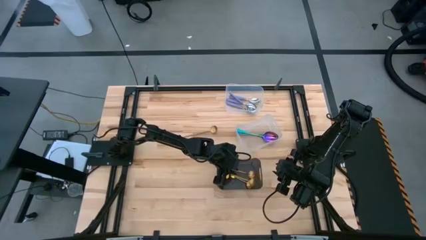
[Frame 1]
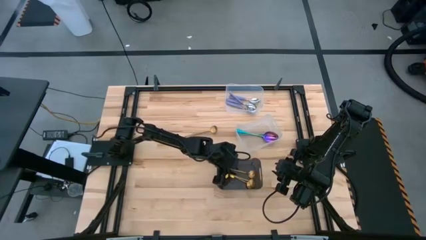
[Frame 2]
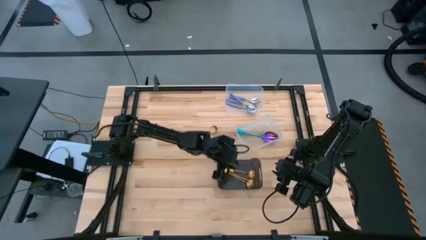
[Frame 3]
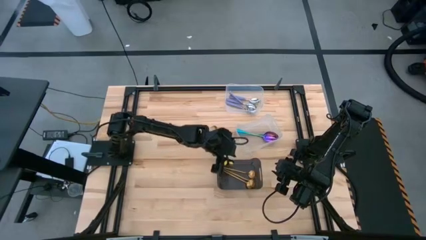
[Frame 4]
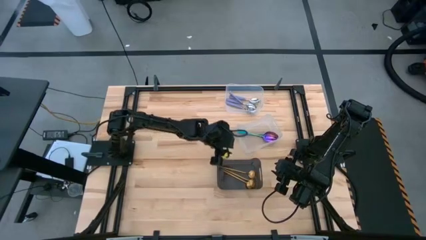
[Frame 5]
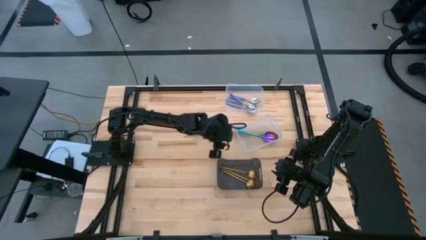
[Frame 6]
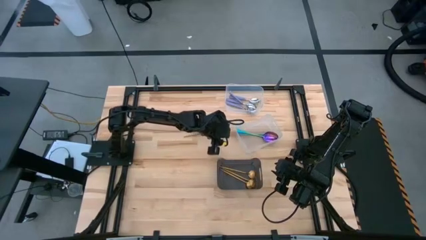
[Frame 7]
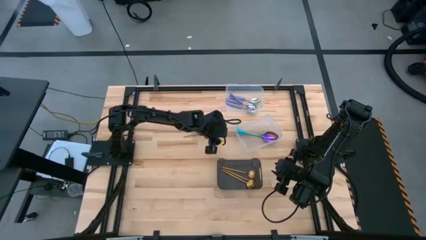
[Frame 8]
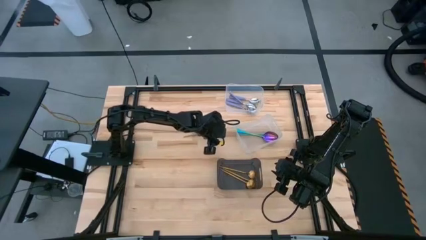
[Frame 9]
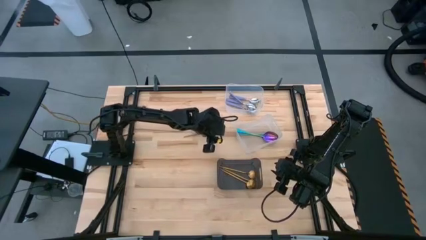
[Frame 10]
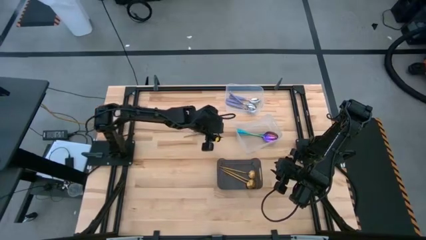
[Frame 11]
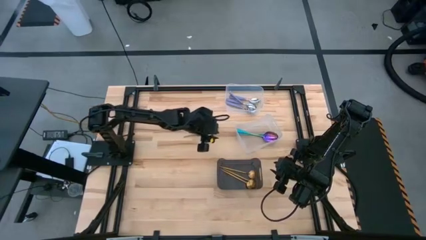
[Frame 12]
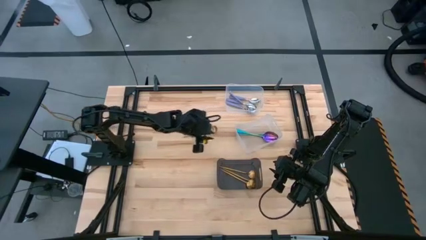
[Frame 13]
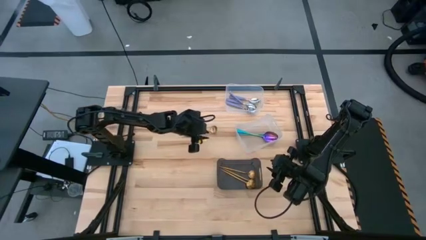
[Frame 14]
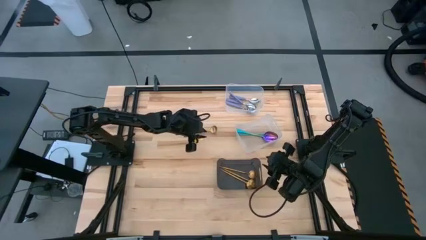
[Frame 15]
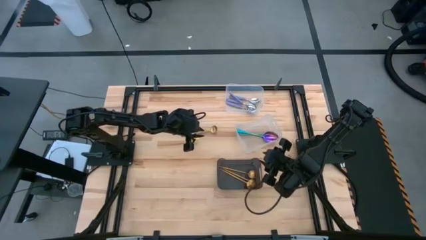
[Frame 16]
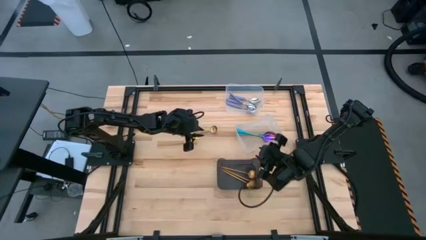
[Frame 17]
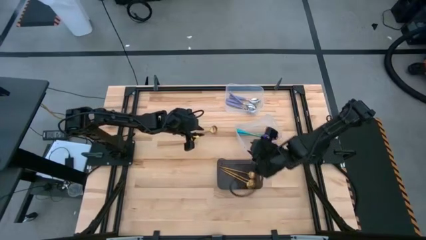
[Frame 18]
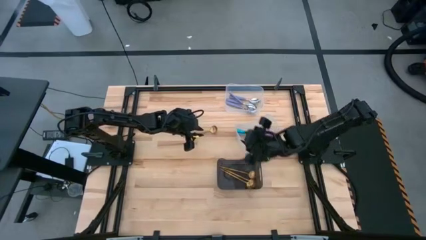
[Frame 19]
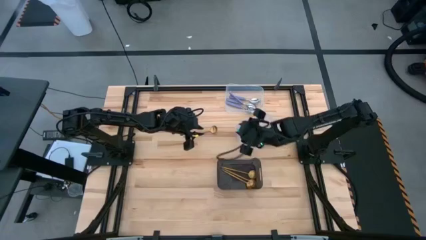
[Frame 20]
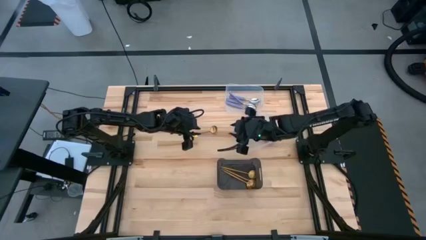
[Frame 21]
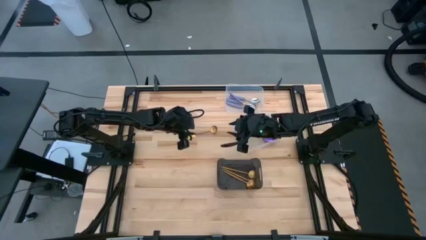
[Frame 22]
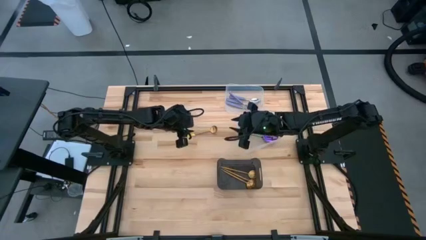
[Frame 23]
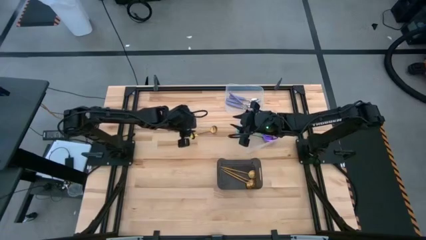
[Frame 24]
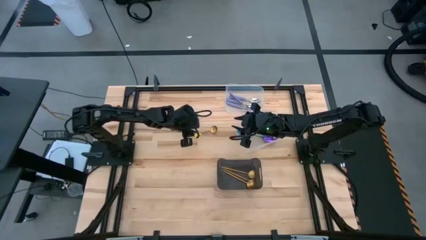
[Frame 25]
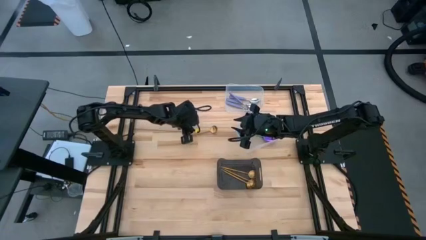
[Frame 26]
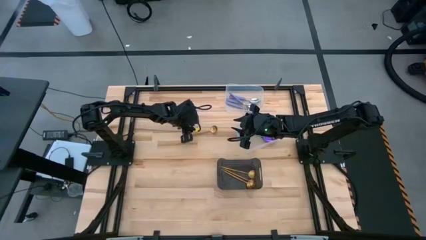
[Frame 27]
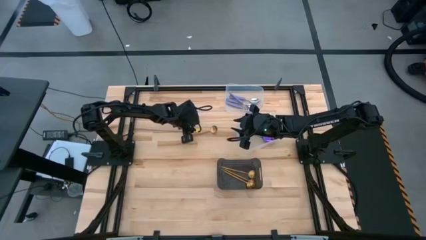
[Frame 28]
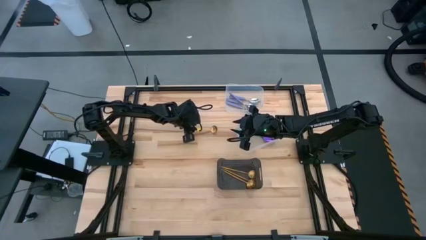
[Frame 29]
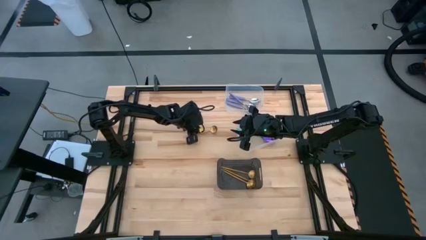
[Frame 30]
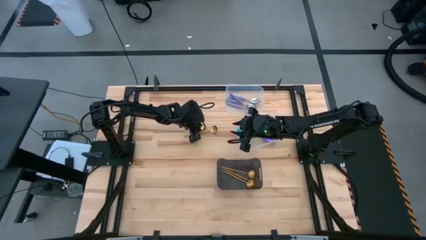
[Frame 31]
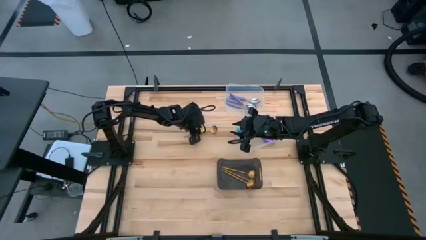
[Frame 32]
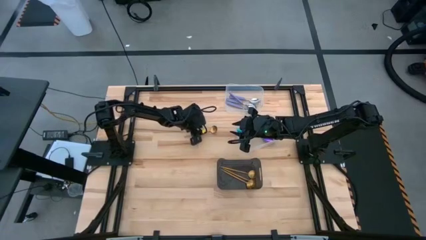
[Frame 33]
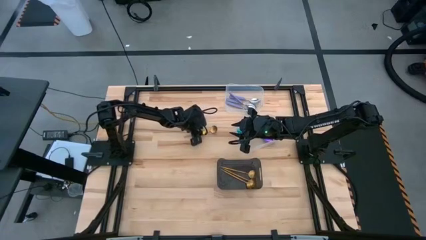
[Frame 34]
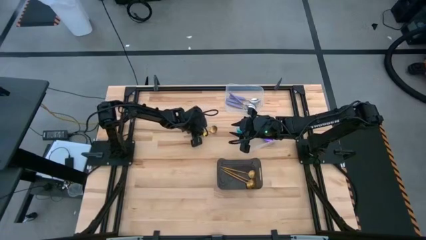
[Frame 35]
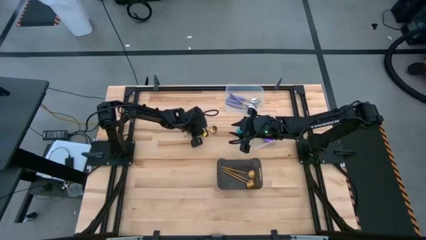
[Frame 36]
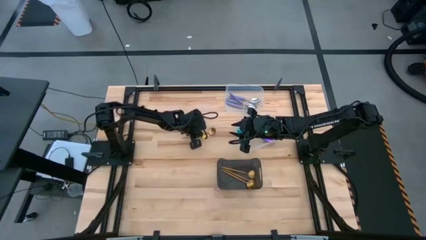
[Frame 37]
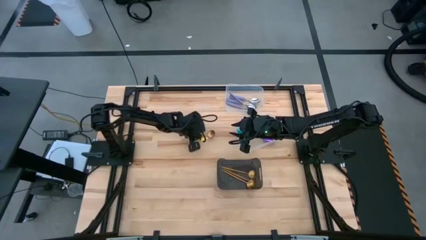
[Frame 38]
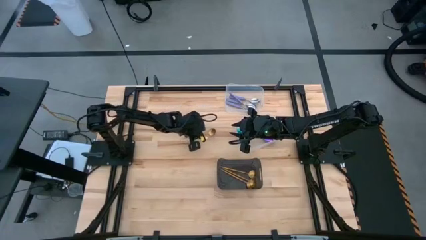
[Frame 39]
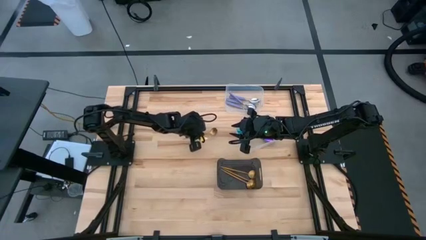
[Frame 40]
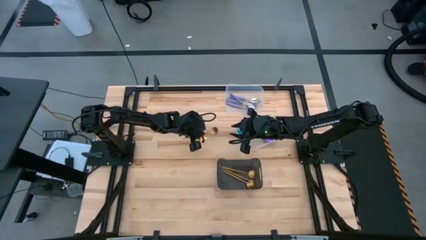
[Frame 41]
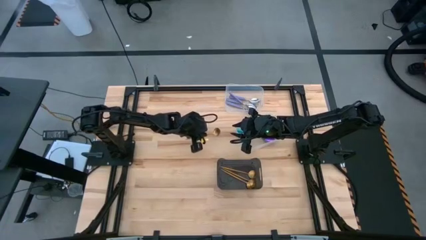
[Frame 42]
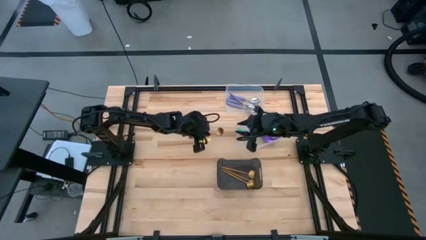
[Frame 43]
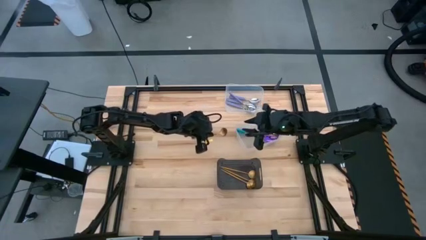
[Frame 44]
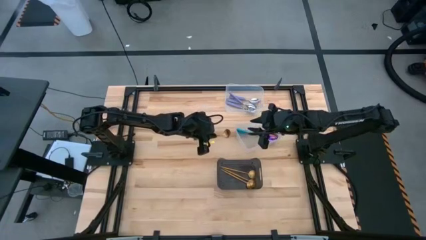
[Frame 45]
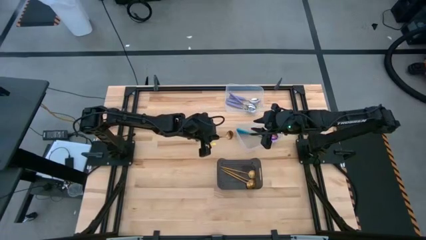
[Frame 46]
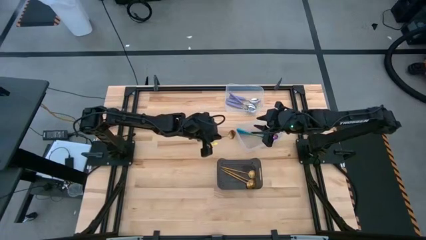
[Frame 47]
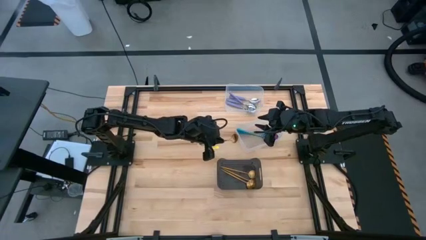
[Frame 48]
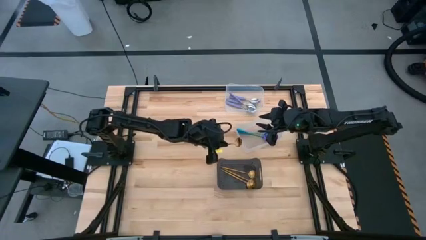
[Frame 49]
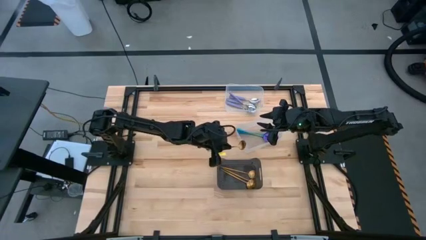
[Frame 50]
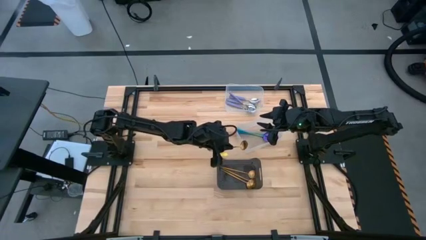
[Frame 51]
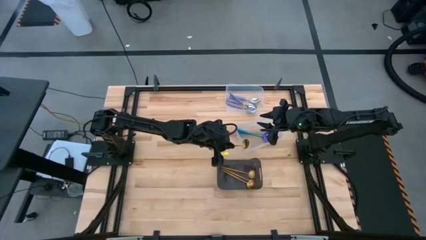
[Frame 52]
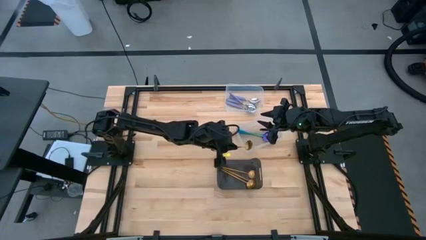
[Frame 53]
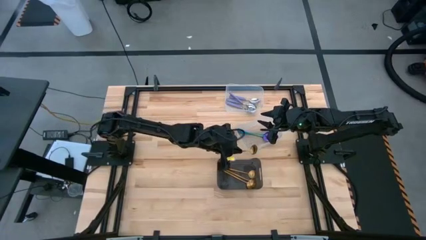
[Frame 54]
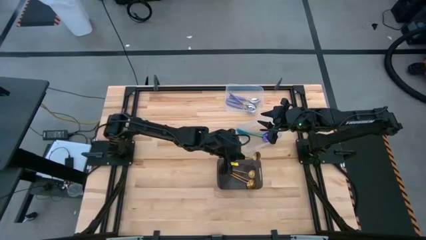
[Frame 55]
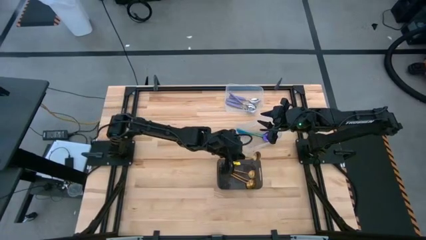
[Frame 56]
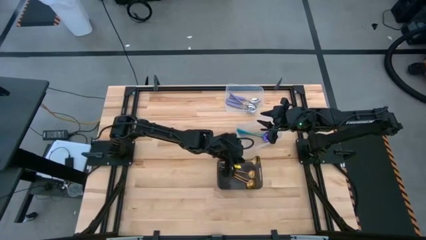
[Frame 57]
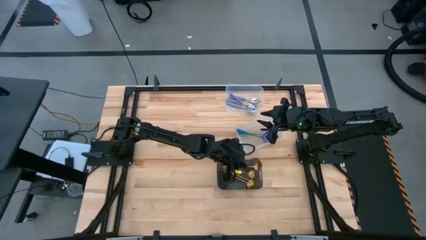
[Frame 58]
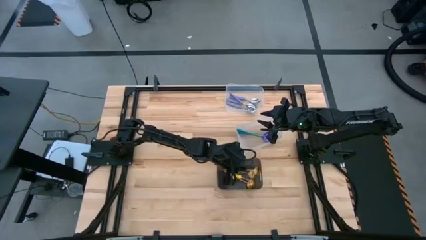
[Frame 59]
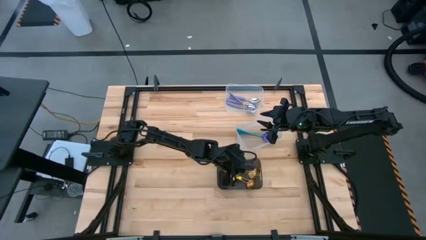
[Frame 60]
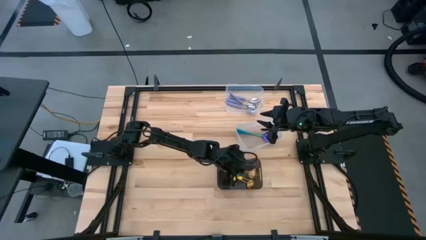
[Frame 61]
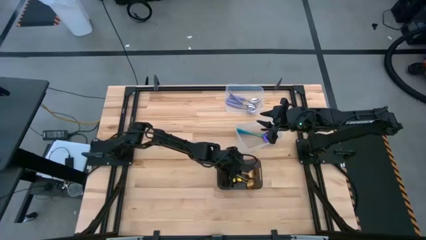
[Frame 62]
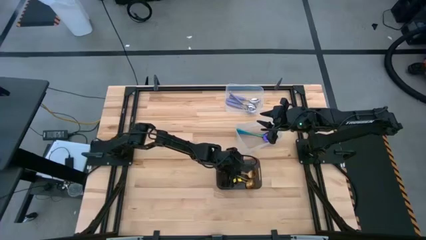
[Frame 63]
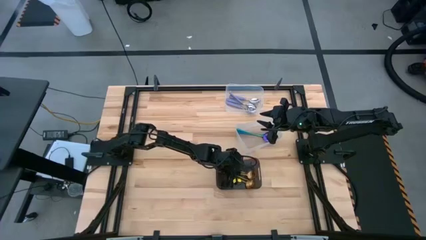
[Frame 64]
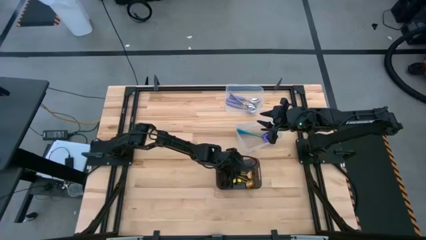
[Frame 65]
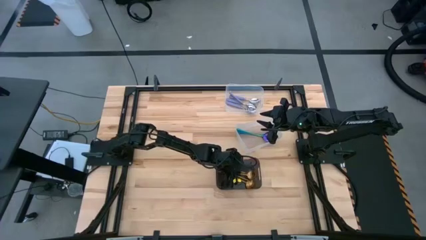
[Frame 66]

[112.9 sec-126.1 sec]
Task: Sort silverware by color (type)
Put the gold spoon into the black bin

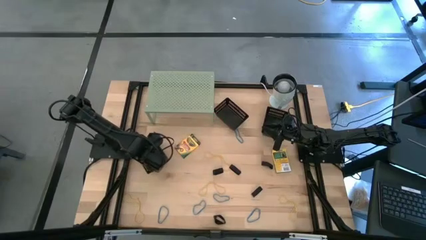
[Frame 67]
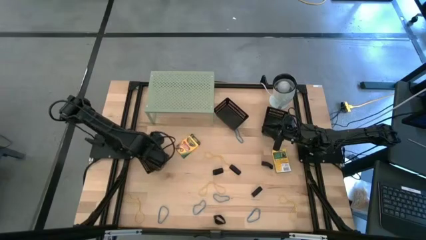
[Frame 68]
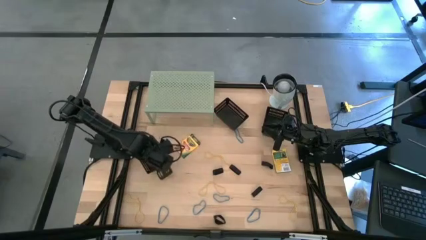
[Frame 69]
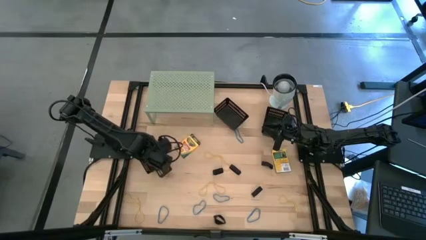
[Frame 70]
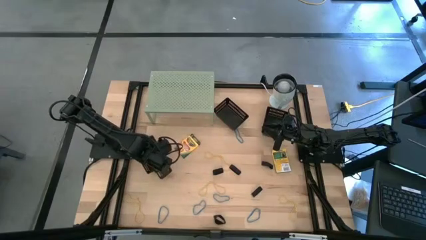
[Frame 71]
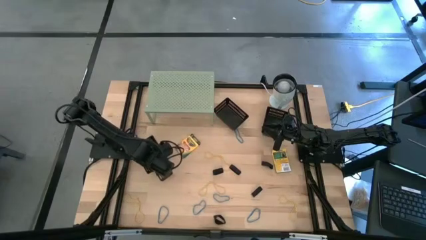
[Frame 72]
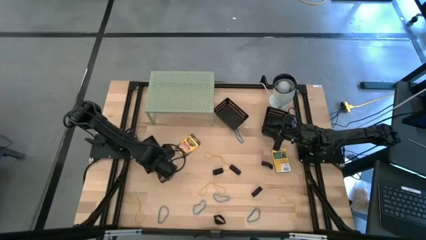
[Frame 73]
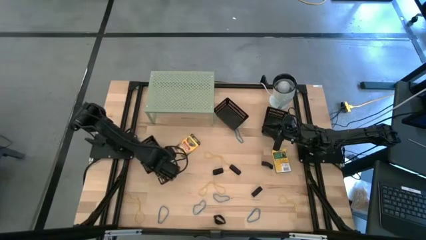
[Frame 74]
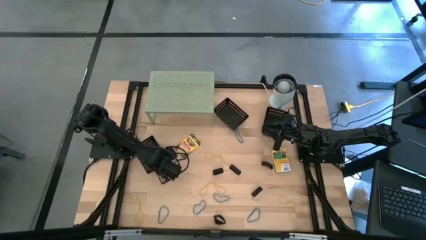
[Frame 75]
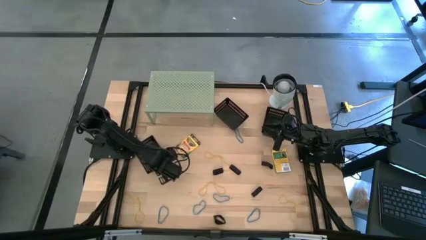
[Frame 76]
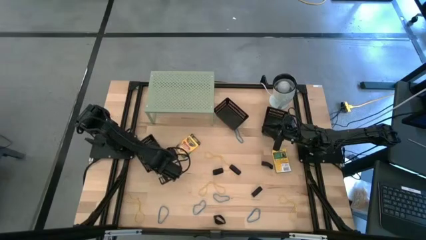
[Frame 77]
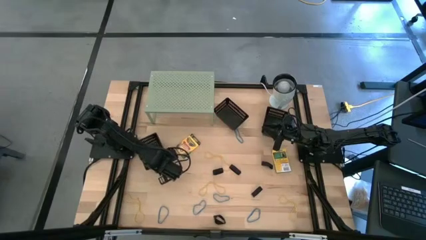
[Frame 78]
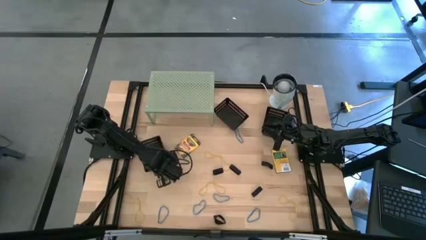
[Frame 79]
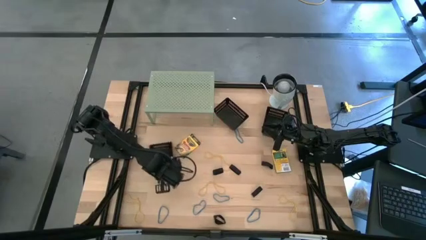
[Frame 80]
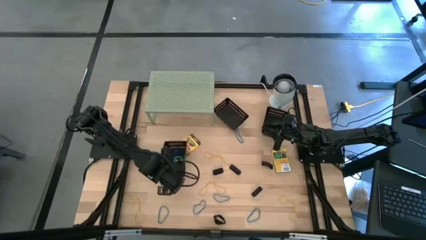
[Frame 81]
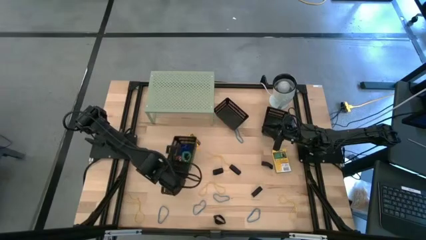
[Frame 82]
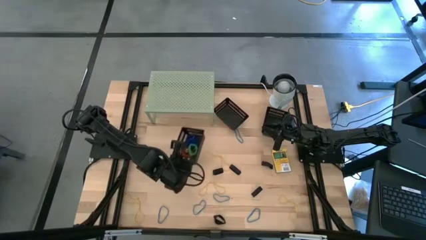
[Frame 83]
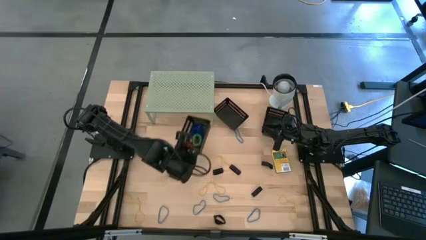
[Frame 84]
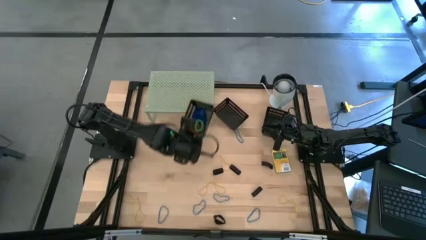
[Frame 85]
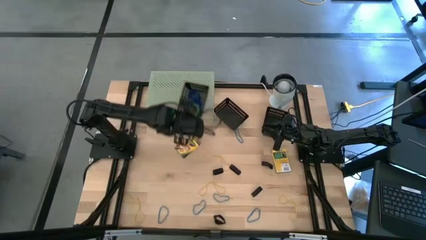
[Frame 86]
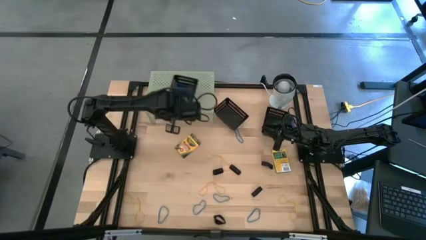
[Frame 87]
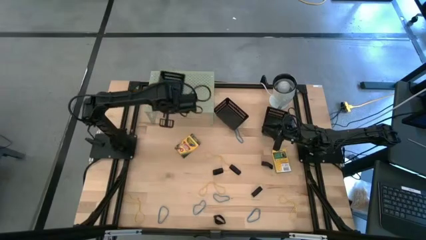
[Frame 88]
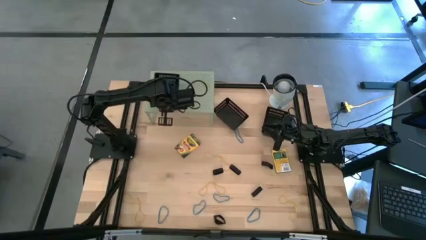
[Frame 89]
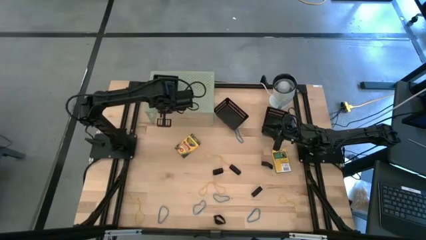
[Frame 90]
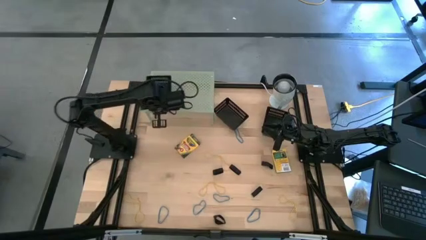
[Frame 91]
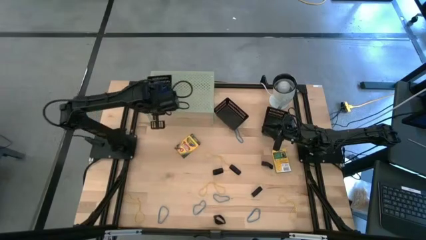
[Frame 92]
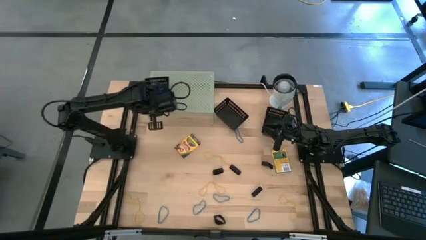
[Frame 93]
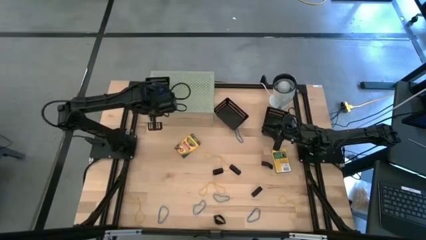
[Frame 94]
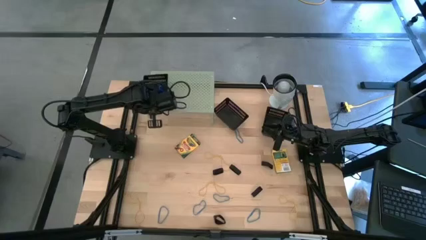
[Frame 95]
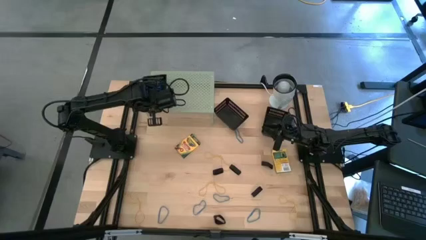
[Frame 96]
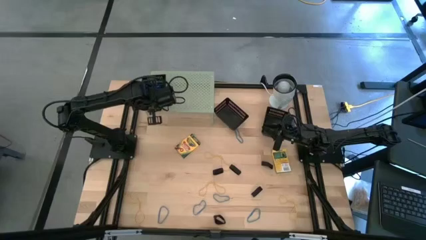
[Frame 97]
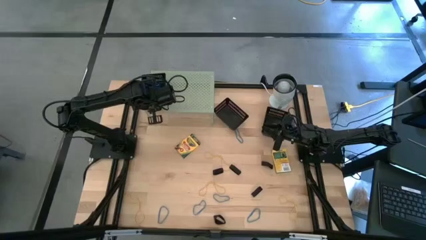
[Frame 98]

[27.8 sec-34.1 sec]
Task: Pick & Place Office Desk Supplies
Put the bottom black bin on the shelf
